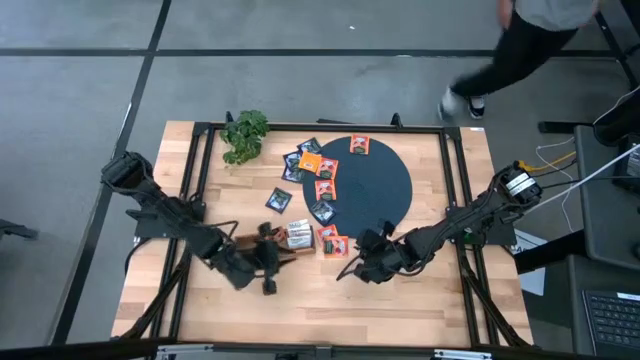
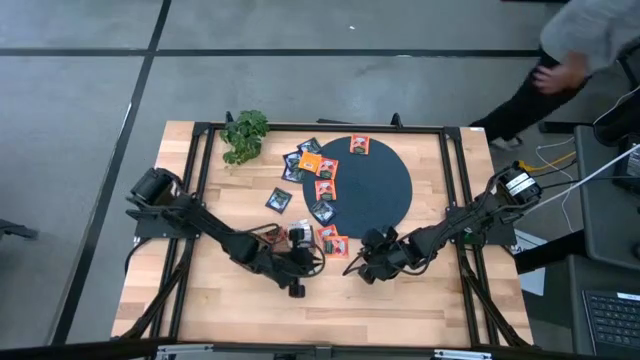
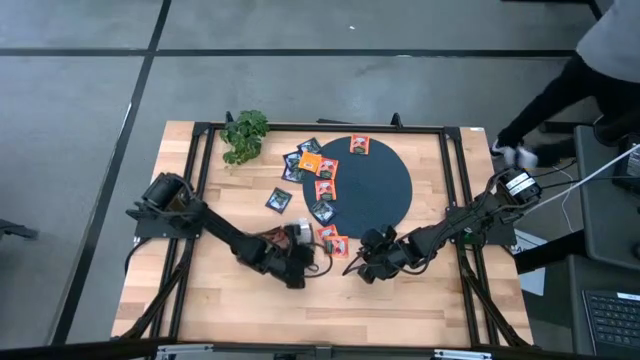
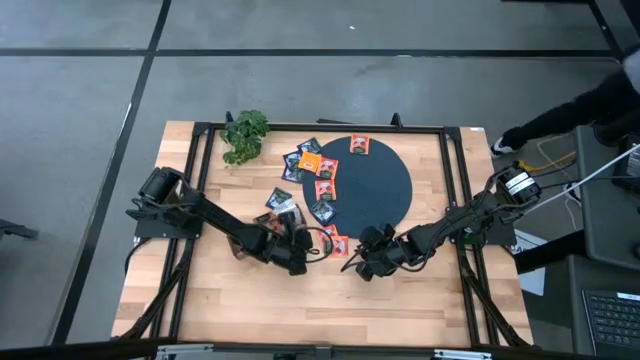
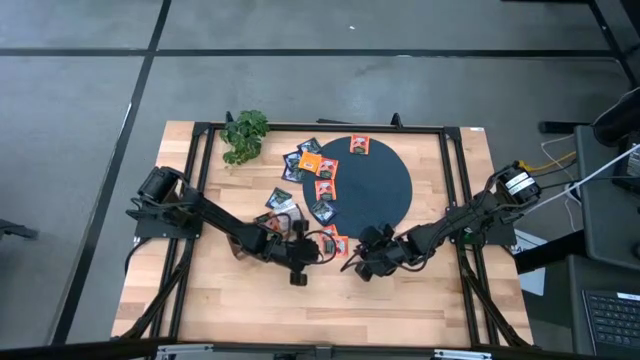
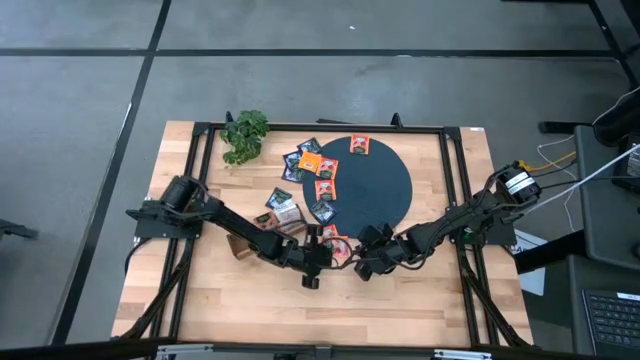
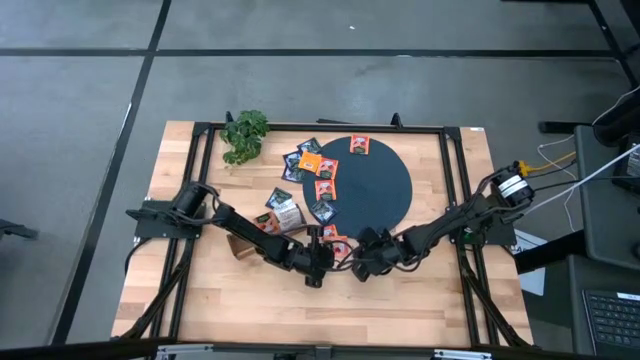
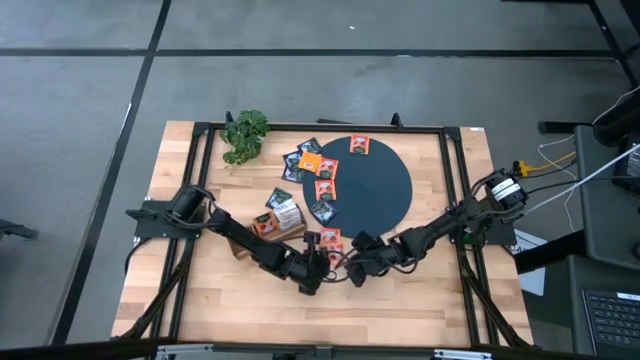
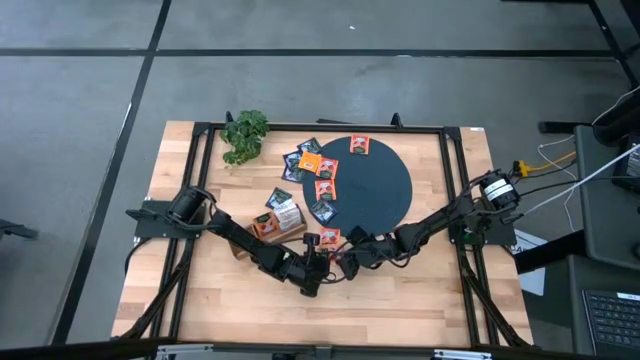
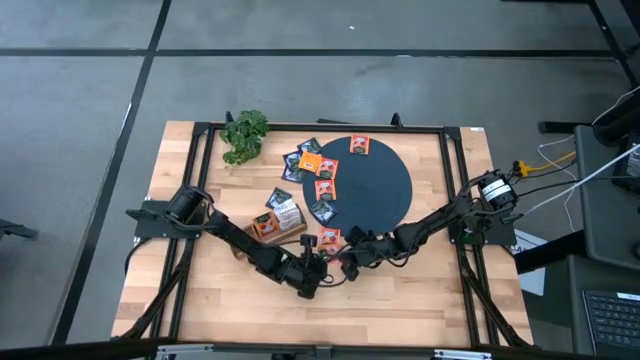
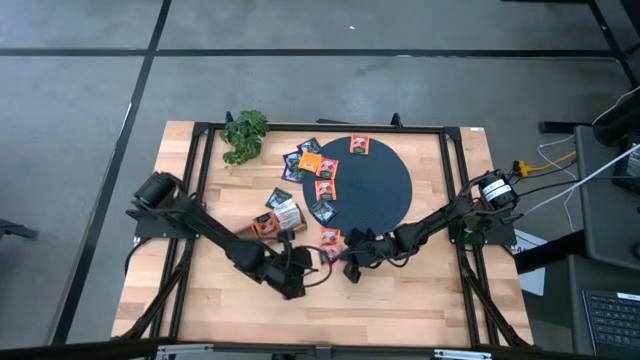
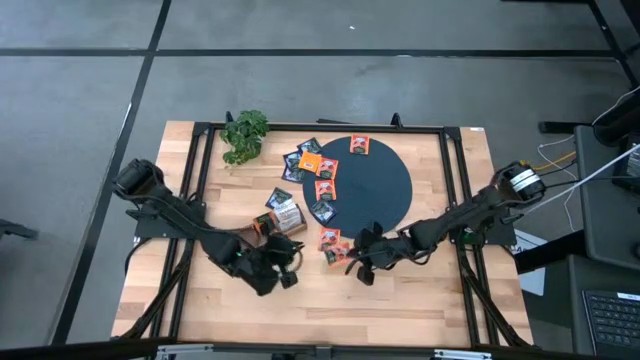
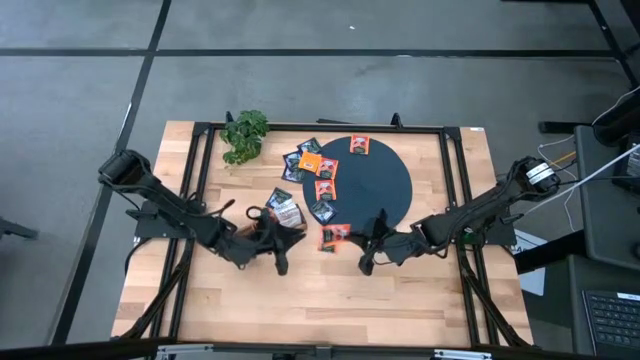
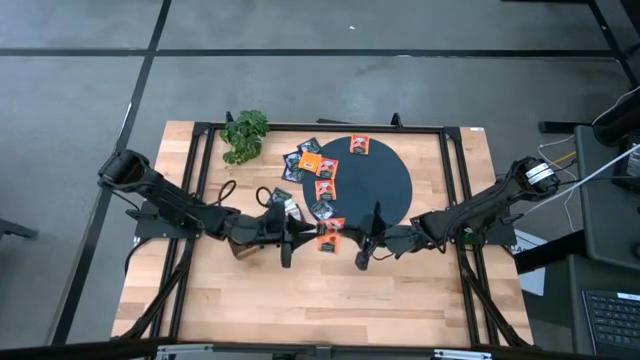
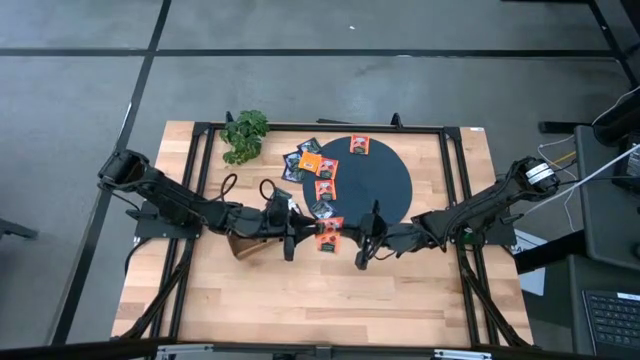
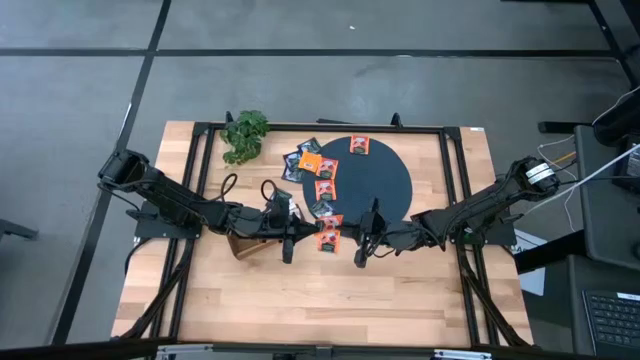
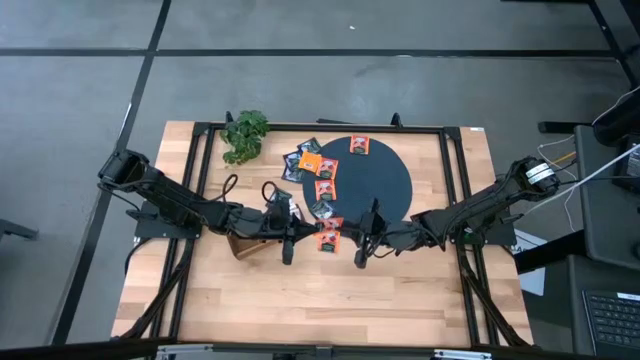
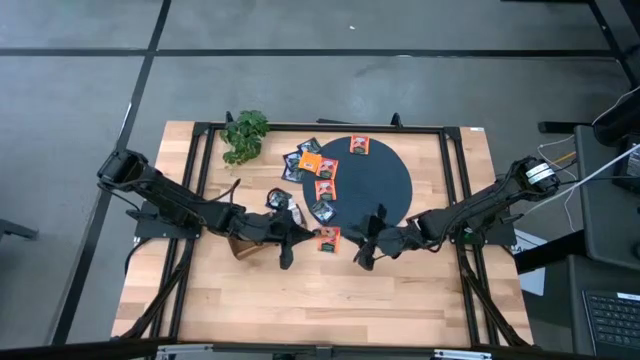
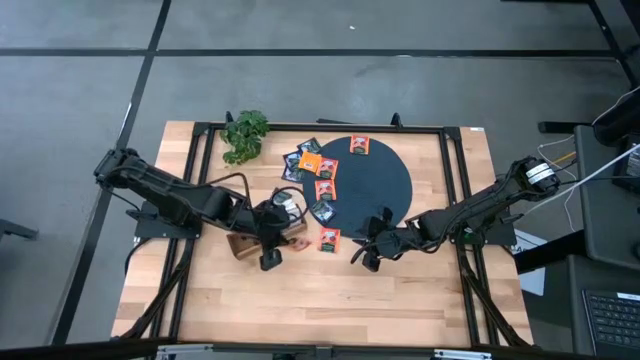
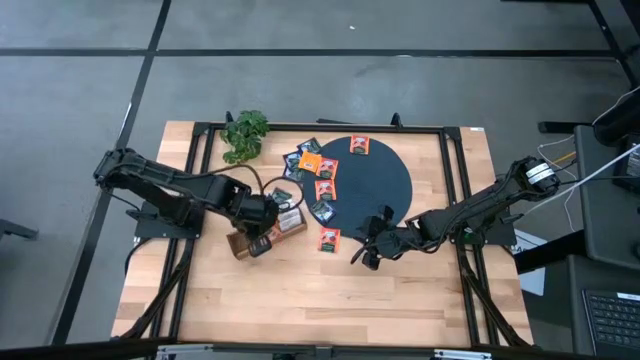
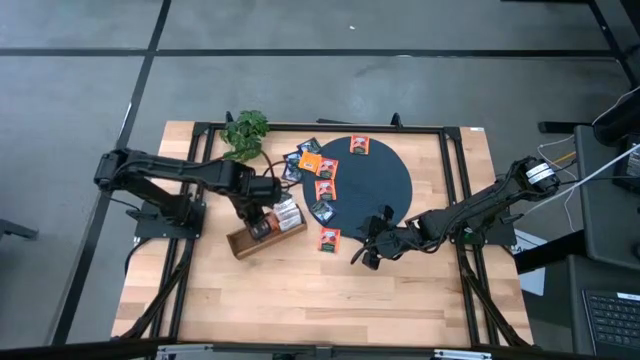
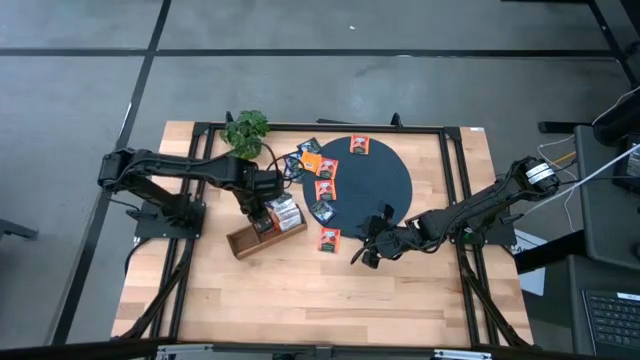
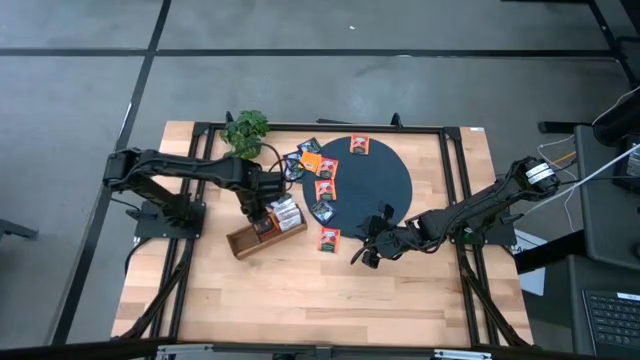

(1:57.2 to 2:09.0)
Task: Pick & Place Tea
Put the orange tea bag into the middle section of the wooden organizer

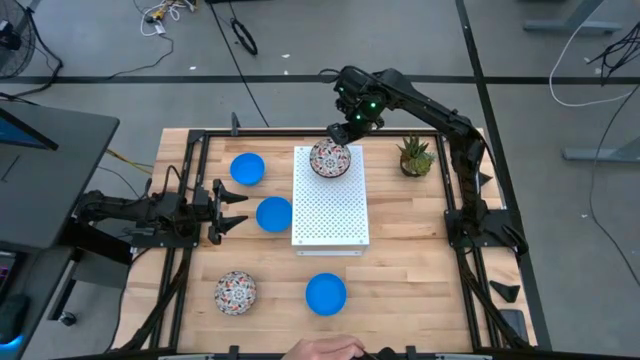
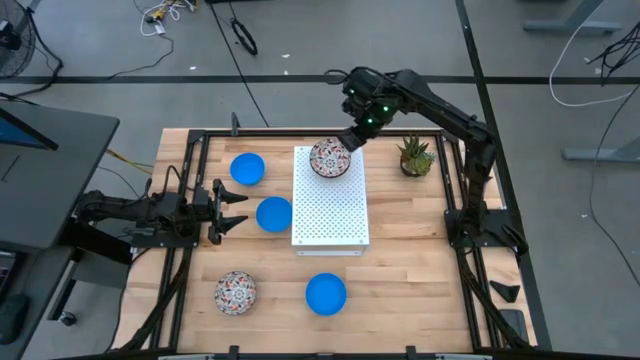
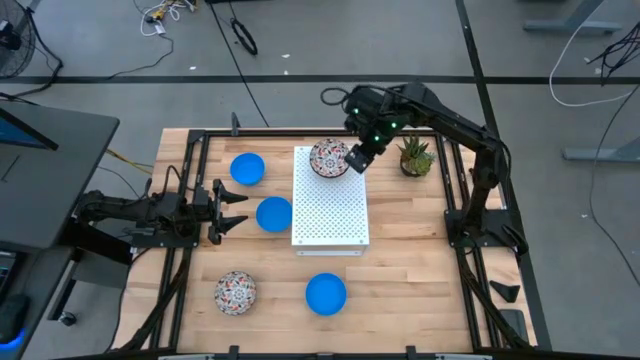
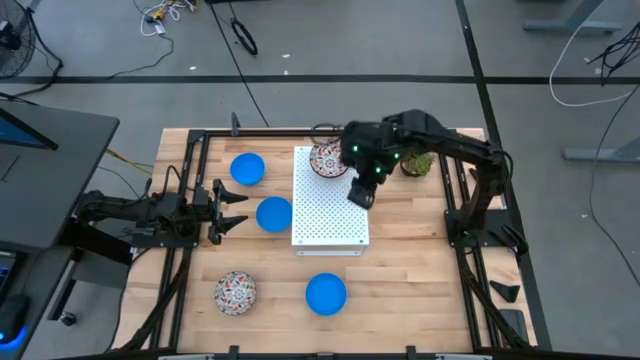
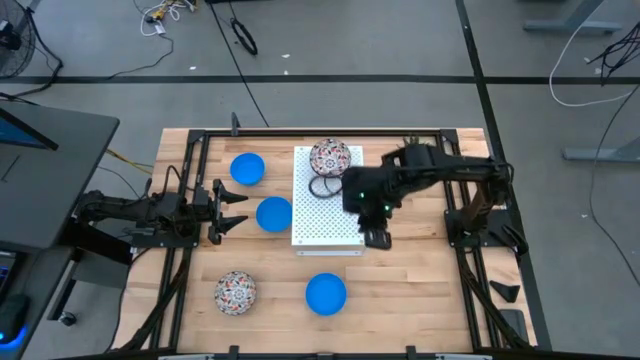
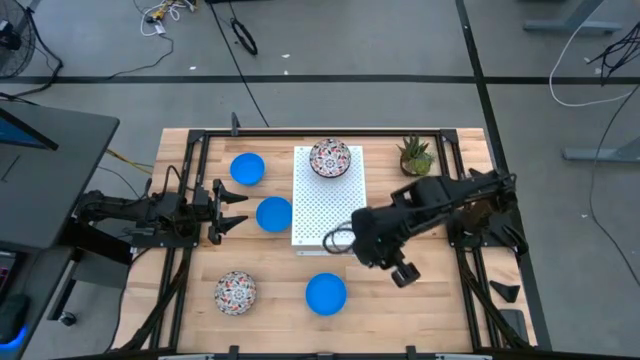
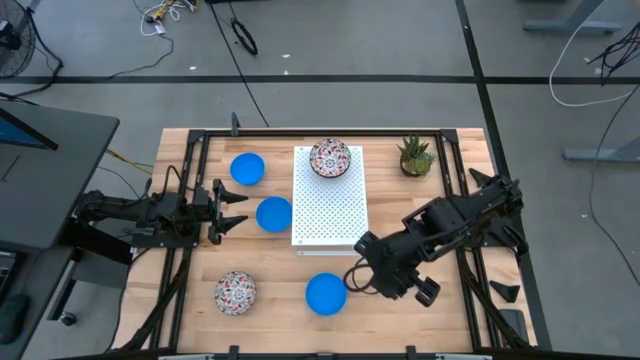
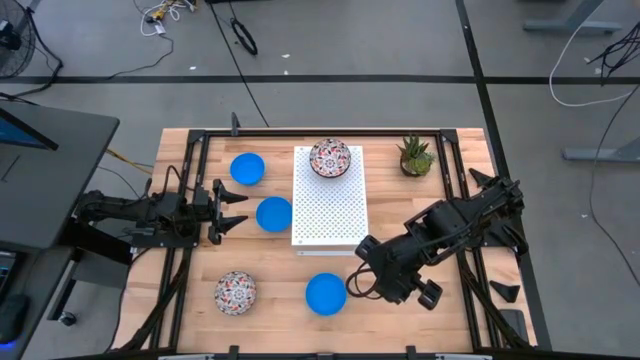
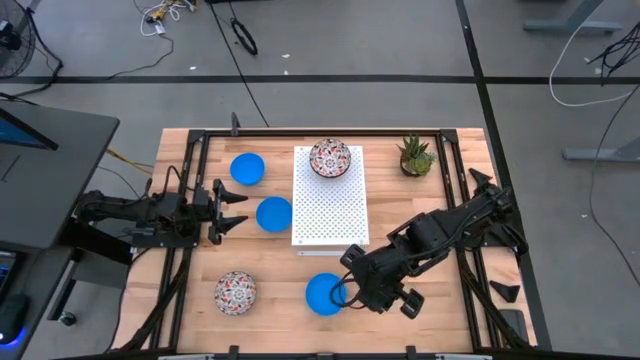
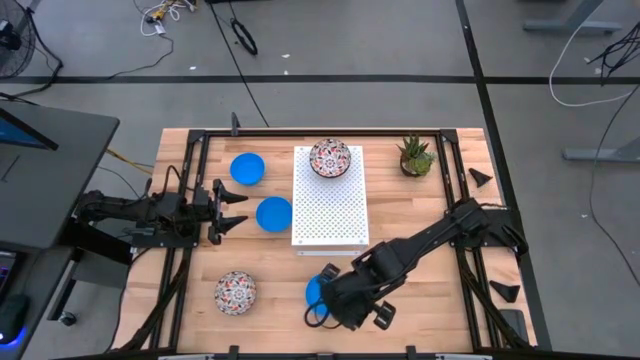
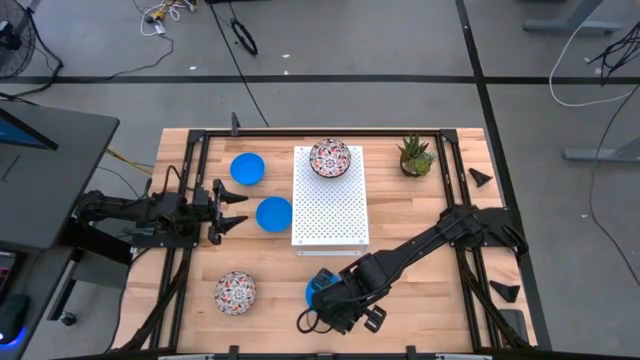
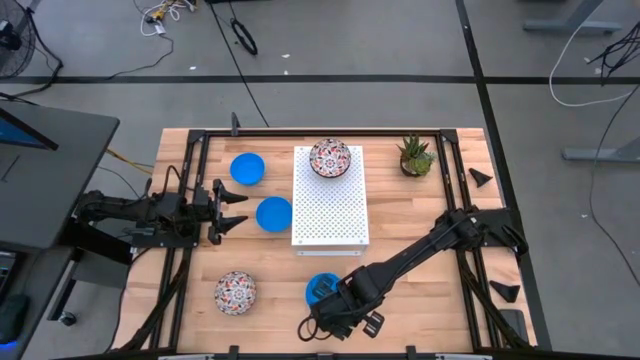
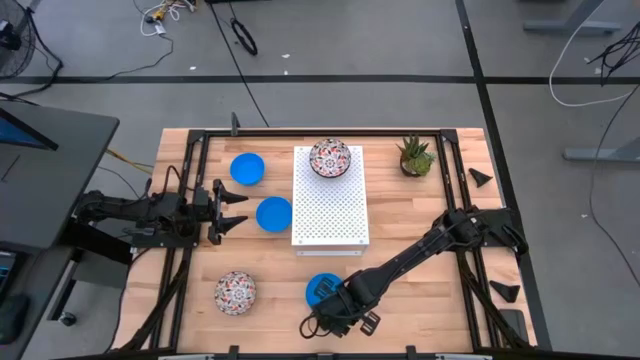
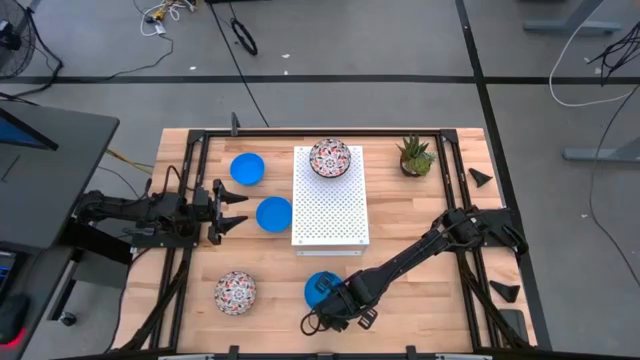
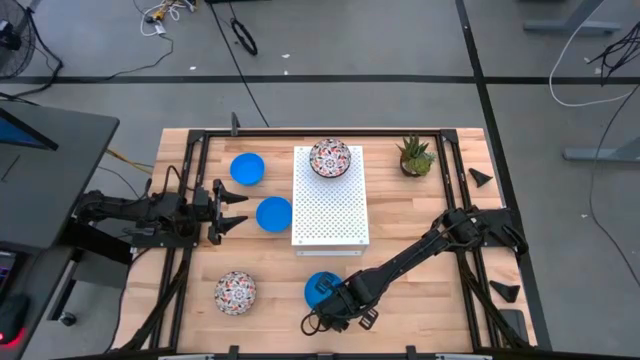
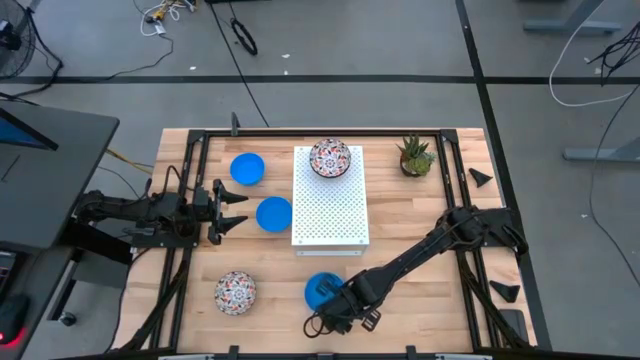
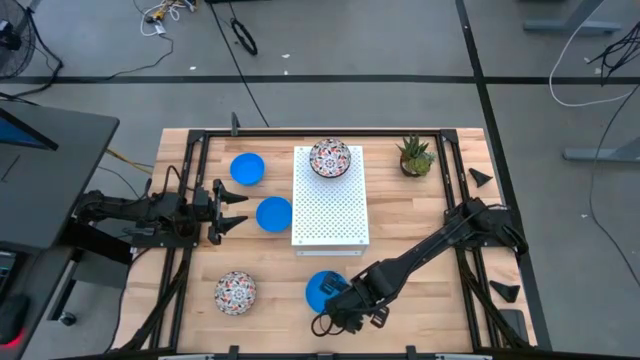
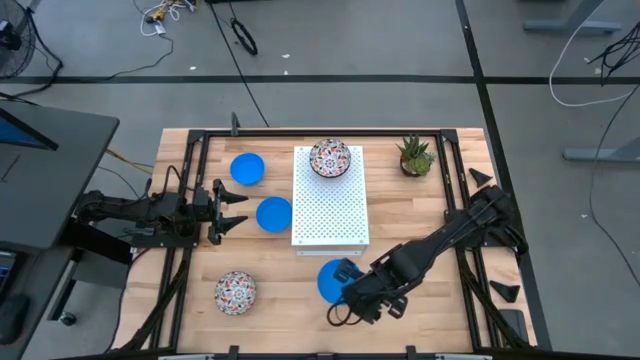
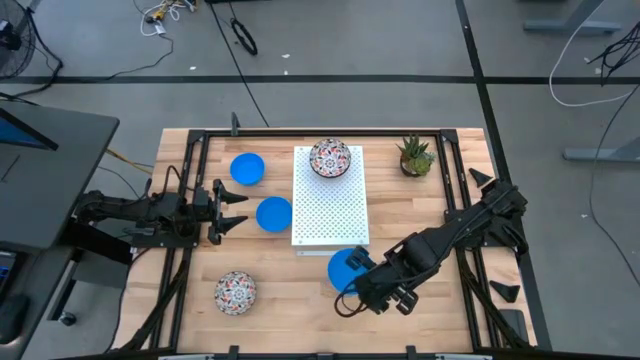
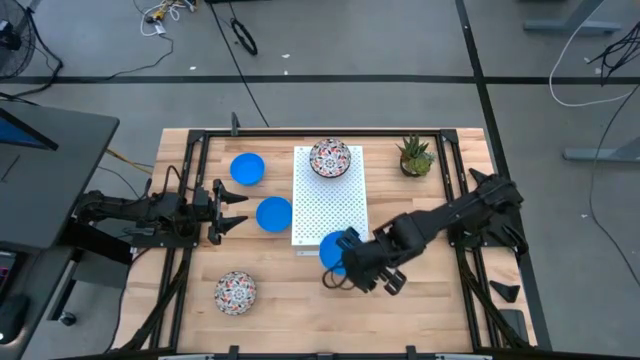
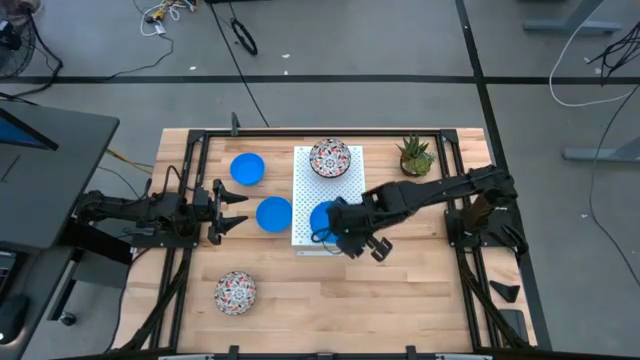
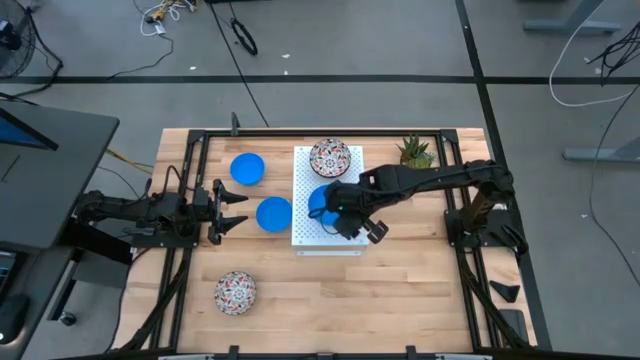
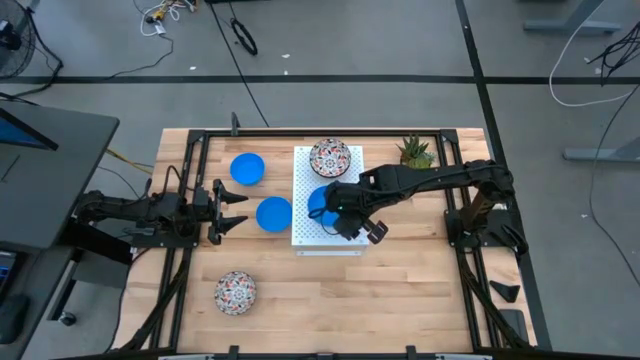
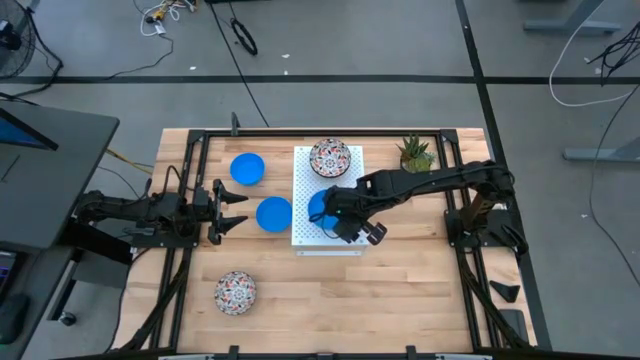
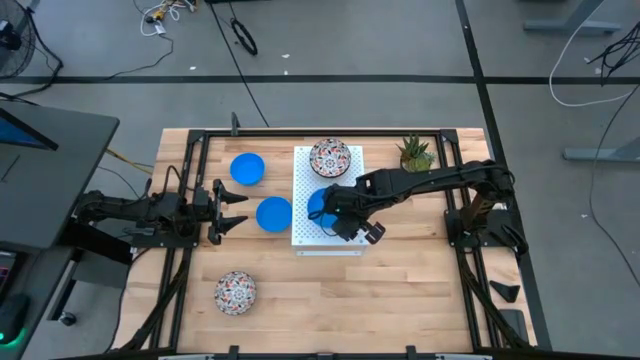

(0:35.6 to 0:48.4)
Task: Pick & Place Mini bowls
Put the bottom blue bowl on the shelf
